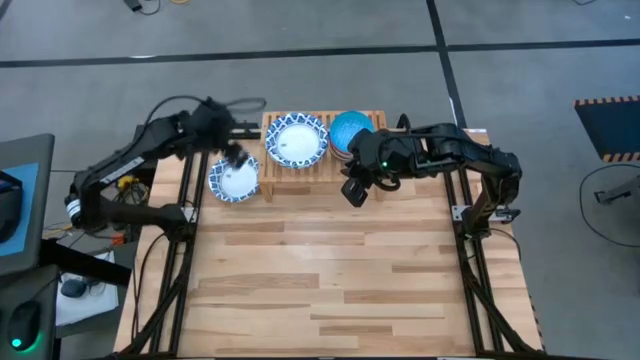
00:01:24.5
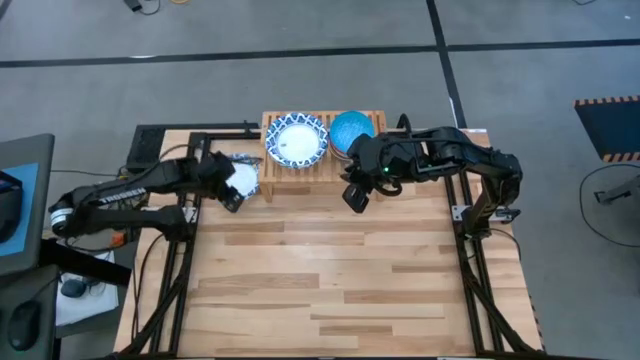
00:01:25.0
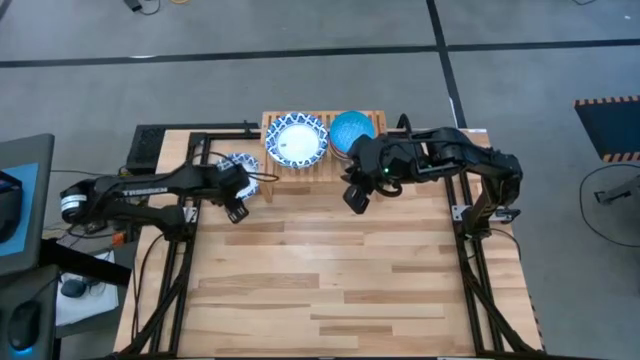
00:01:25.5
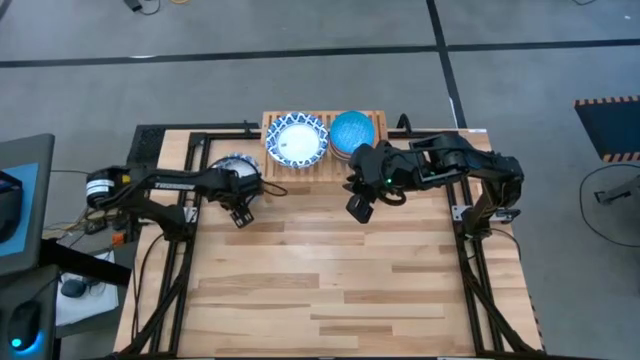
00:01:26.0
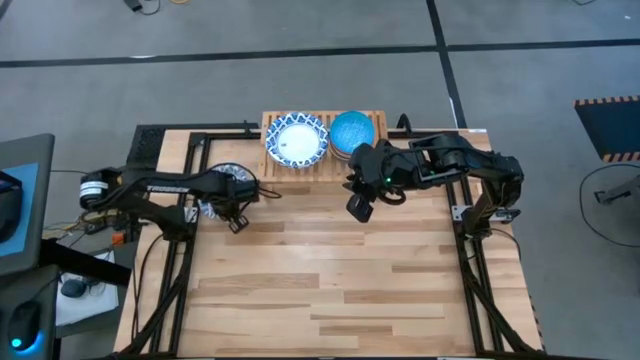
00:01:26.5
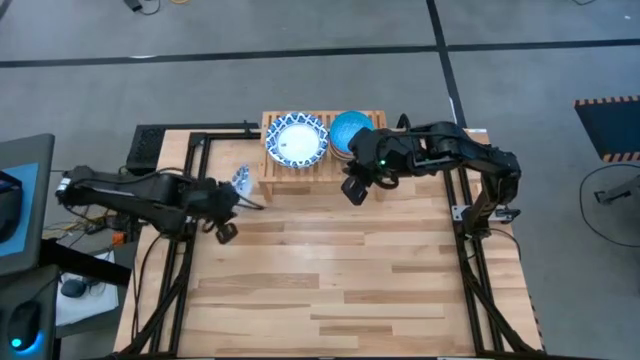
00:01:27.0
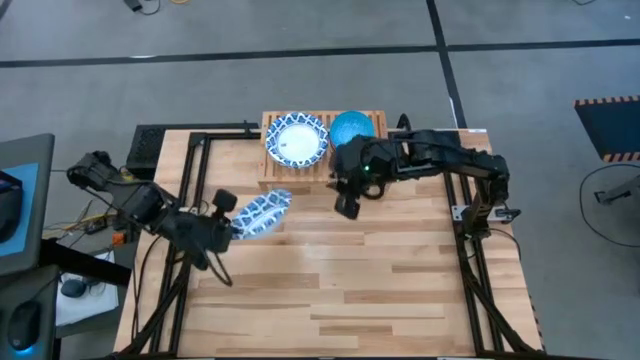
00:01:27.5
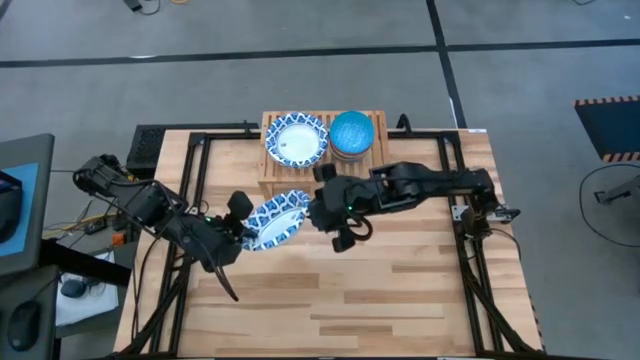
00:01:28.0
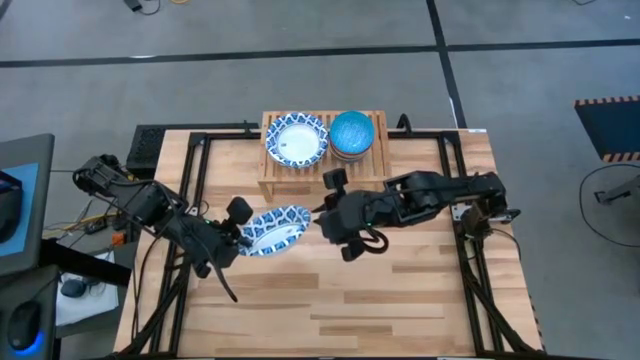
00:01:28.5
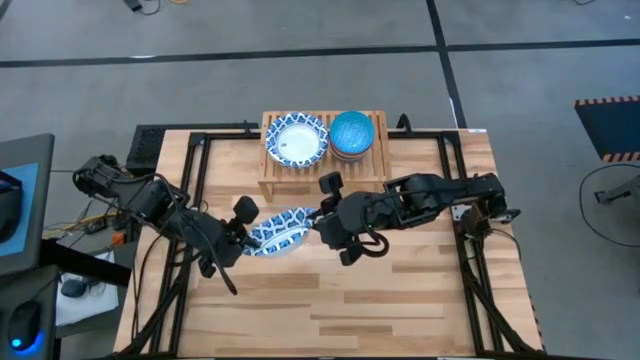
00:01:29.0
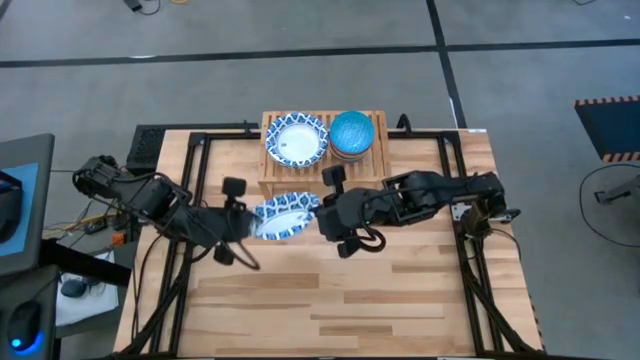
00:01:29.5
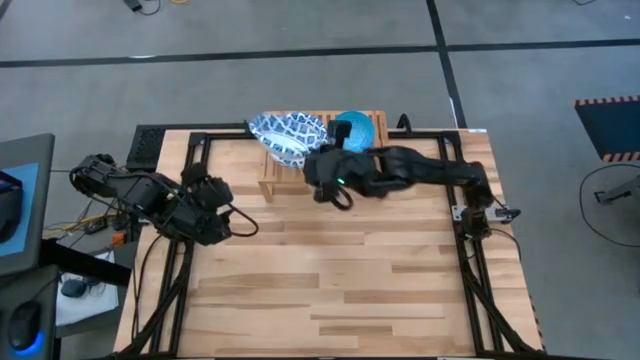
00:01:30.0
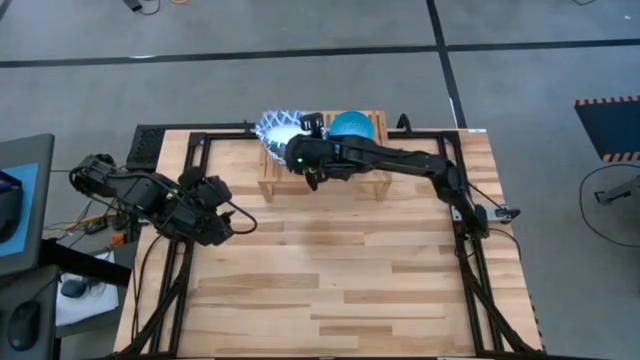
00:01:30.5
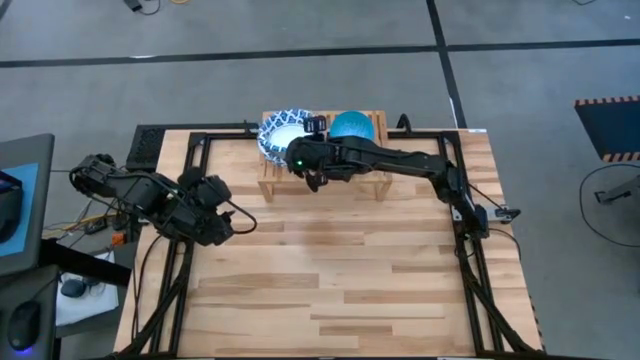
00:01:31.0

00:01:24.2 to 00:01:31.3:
Task: Place and stack bowls onto a shelf
Stack the white patterned bowl on top of the white patterned bowl

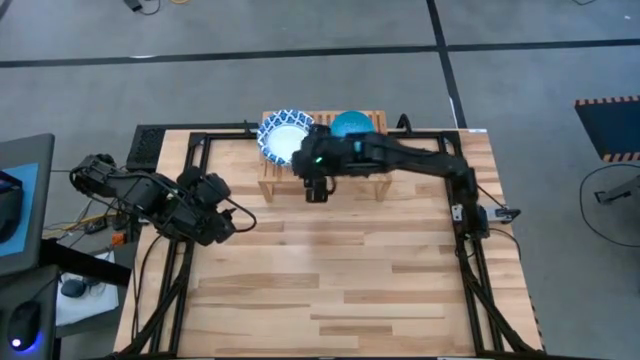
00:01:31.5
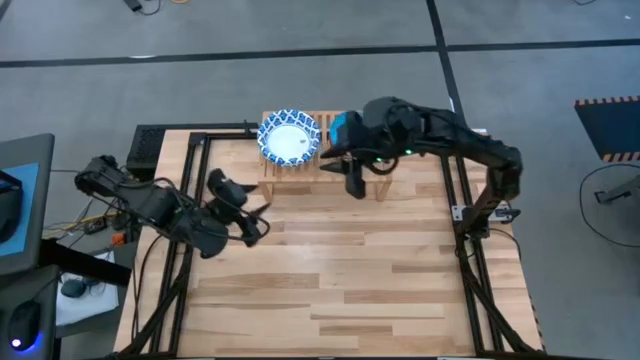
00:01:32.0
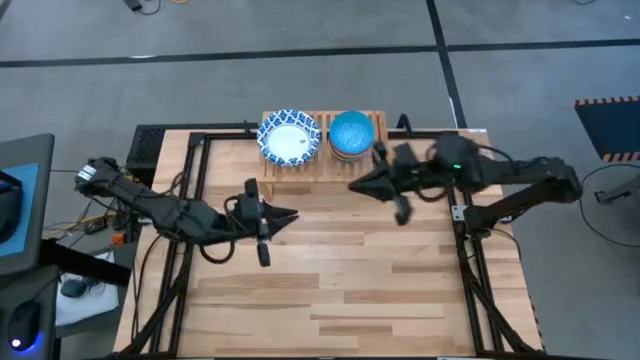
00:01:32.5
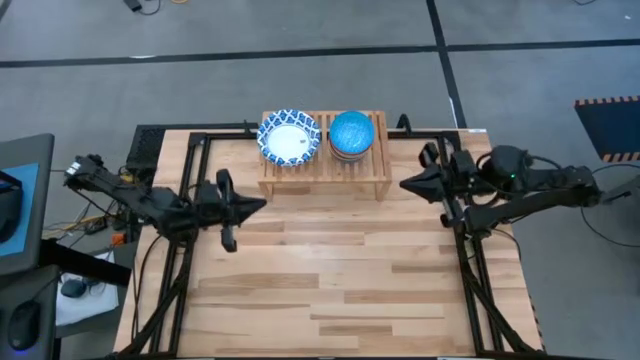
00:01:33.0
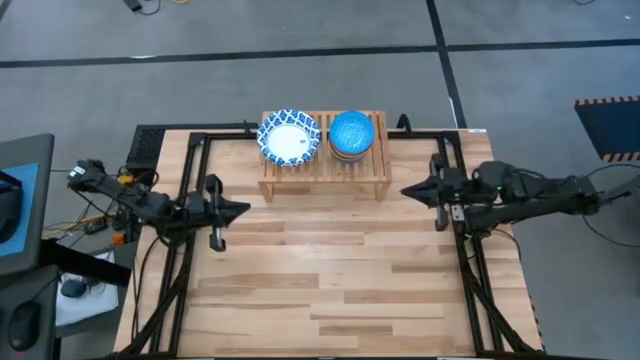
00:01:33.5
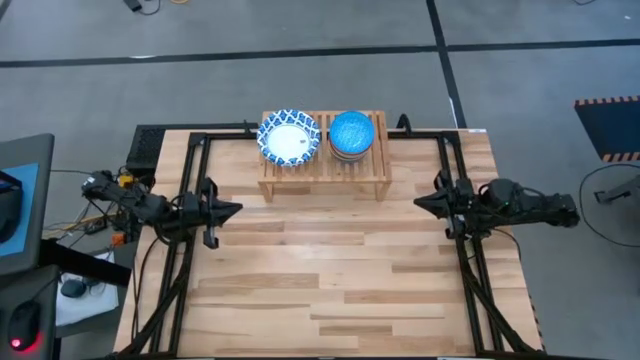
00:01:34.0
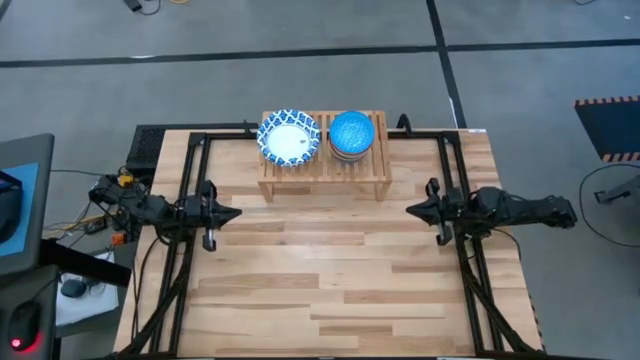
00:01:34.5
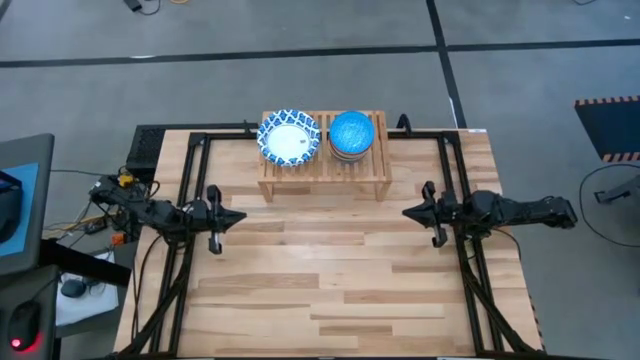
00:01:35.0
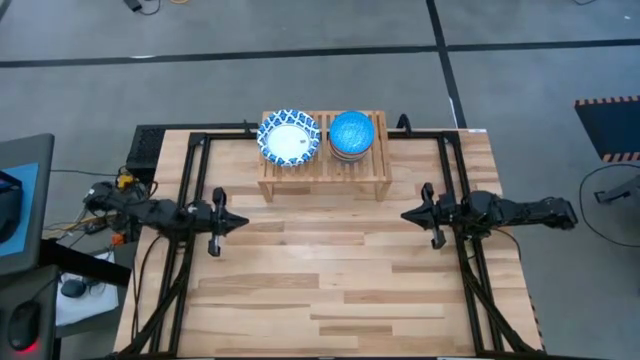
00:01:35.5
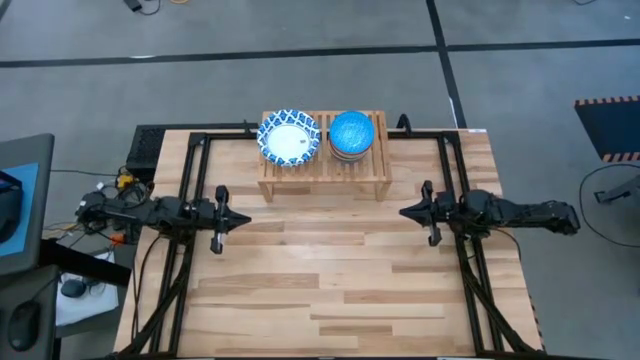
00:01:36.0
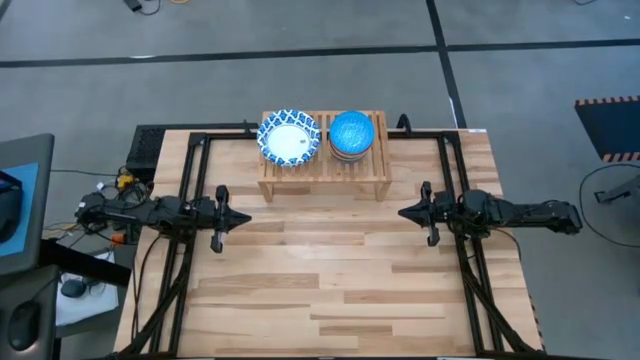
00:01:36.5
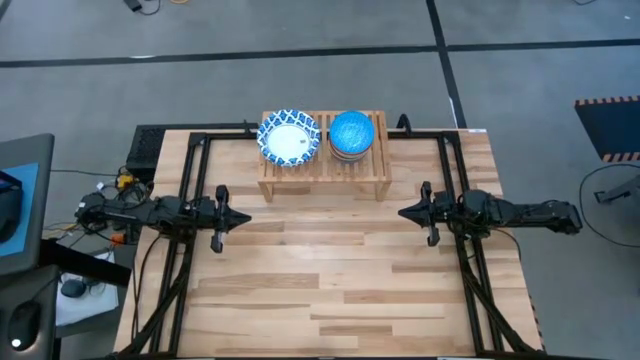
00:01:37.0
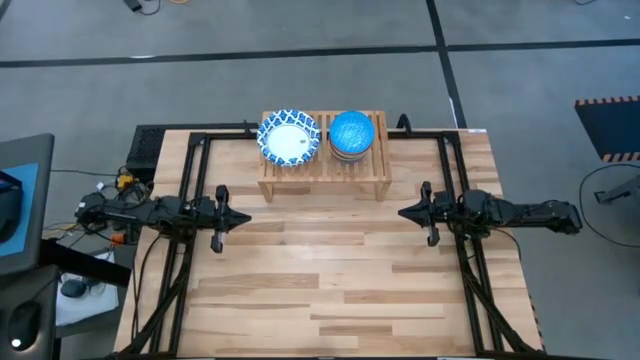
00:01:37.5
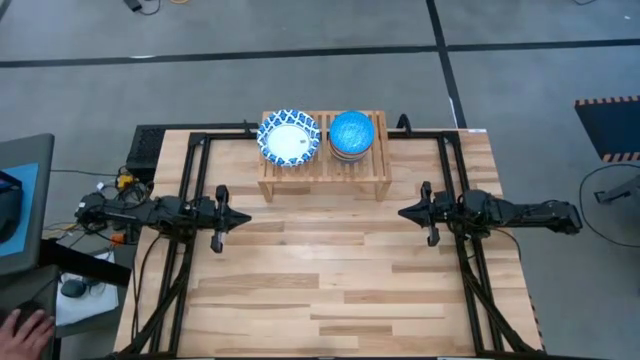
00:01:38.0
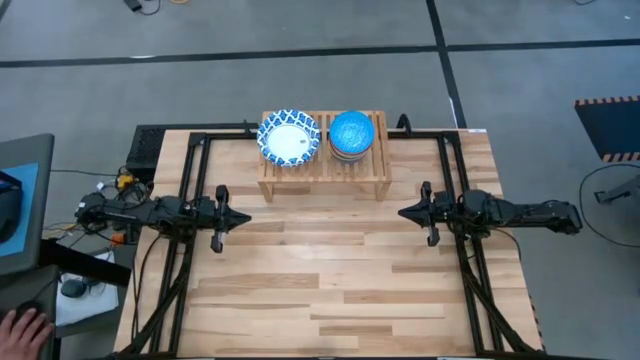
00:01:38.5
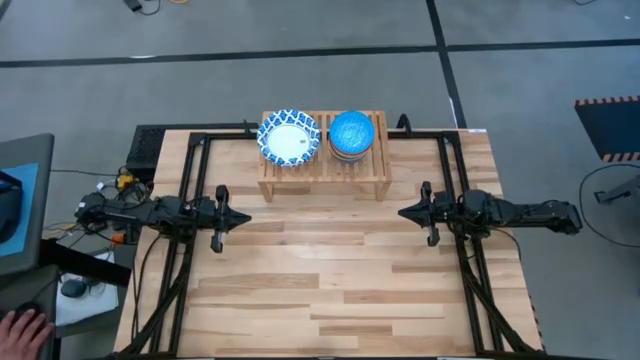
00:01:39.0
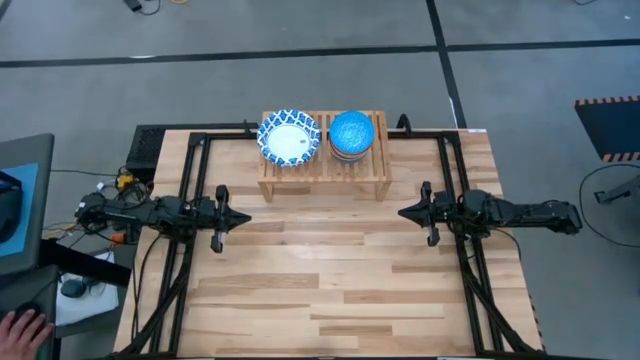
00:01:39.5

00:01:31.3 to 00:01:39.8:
Return to Home Position

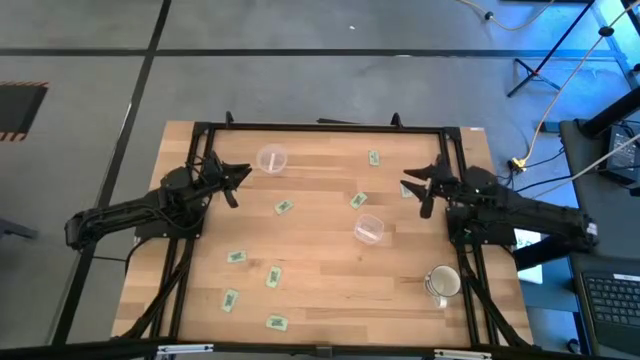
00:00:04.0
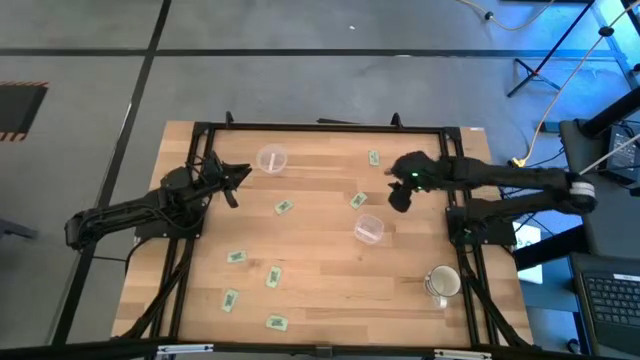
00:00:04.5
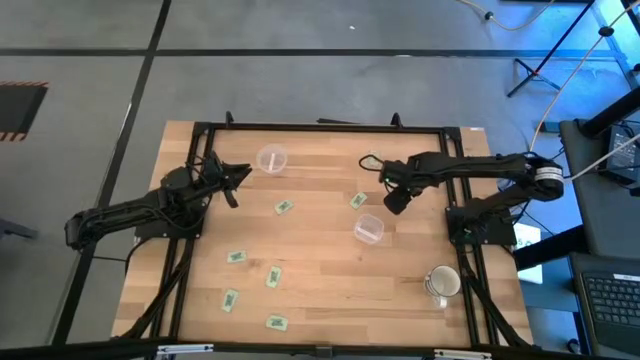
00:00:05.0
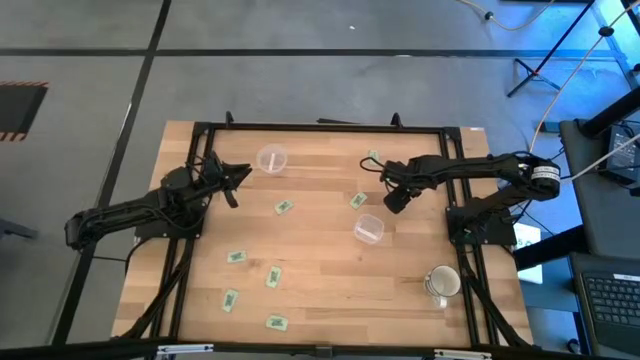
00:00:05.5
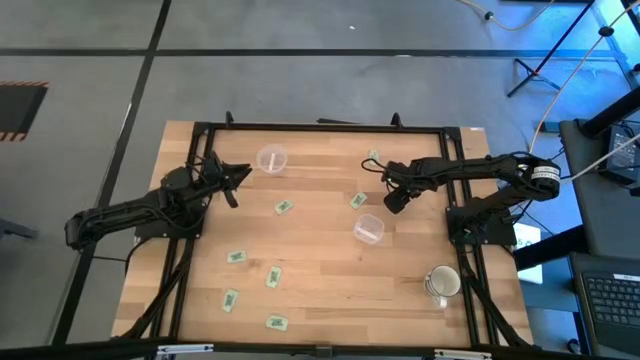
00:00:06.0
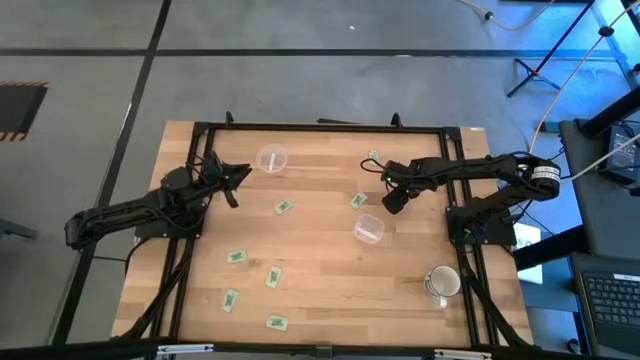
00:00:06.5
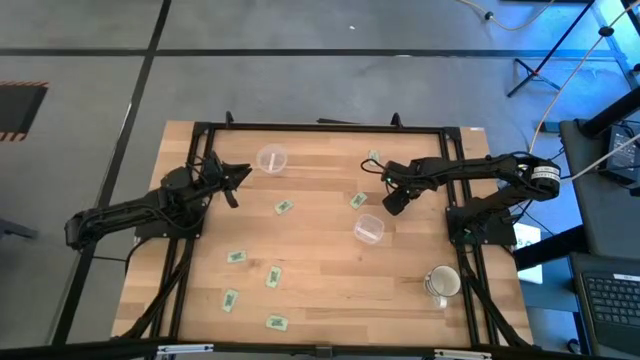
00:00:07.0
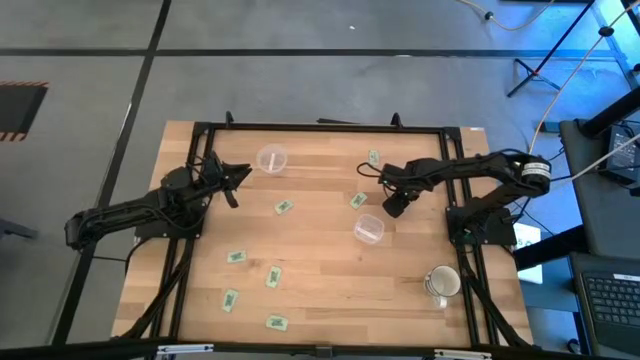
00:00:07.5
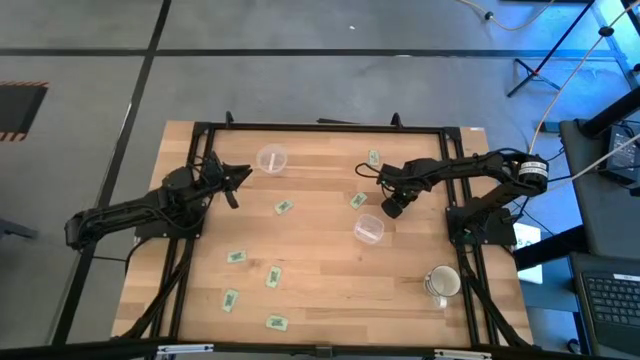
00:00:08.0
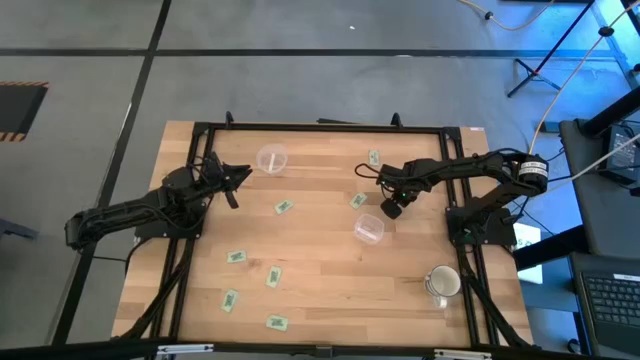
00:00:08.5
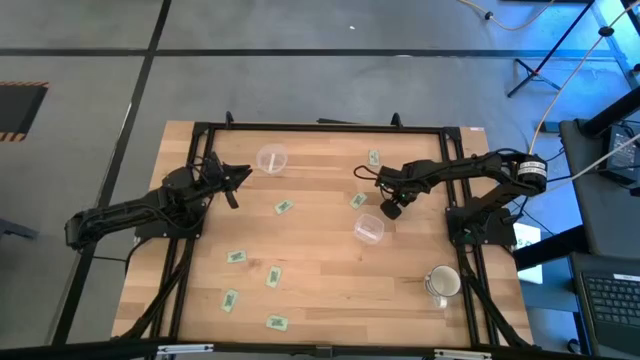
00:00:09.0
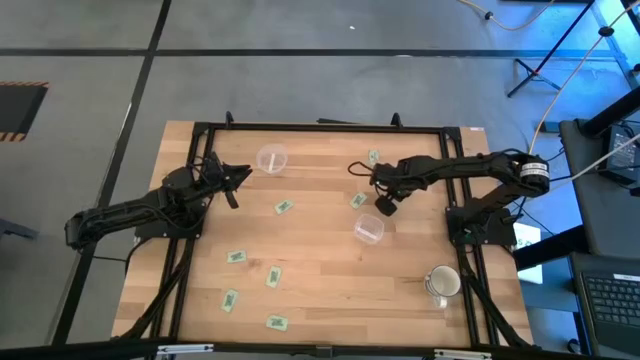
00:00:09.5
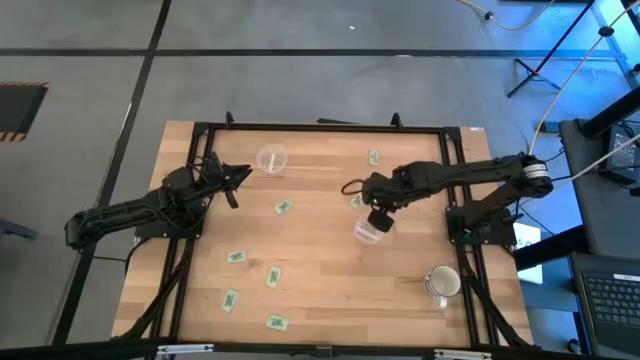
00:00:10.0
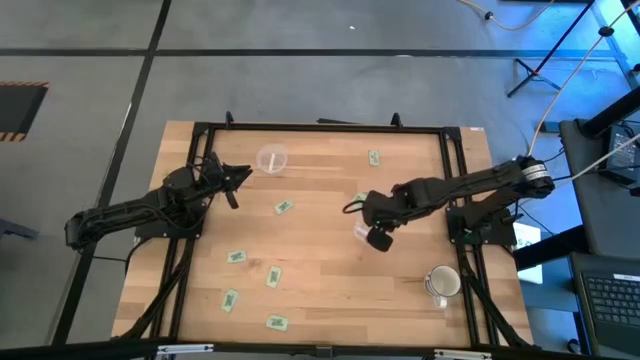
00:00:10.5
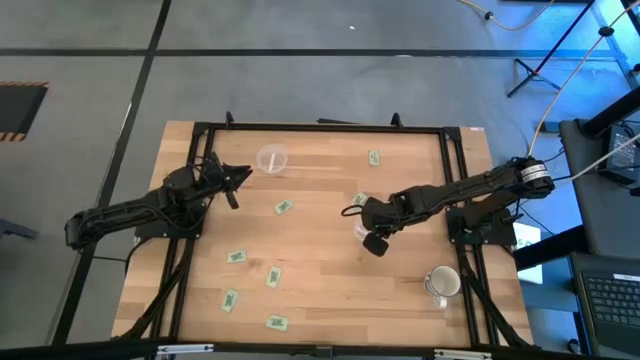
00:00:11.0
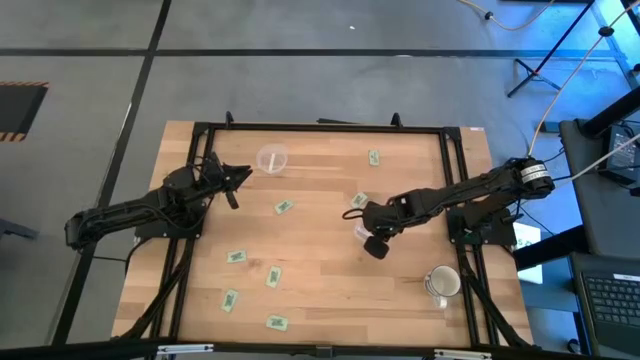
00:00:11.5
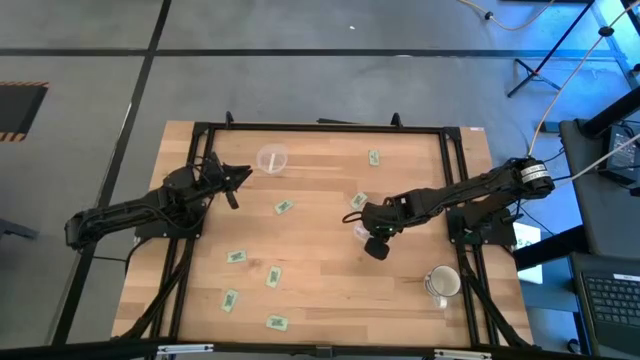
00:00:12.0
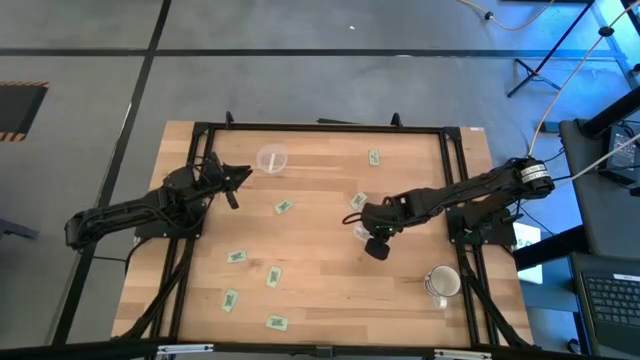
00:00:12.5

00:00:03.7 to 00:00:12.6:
Task: Pick and place Stevia / Truvia into bins
Put the stevia packet into the bottom transparent container
